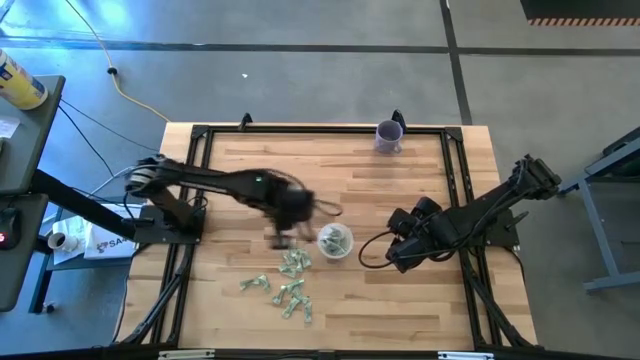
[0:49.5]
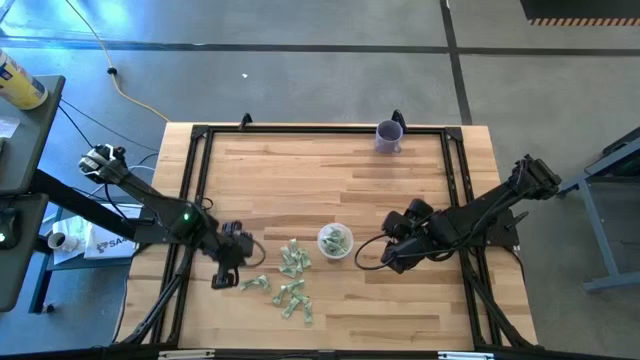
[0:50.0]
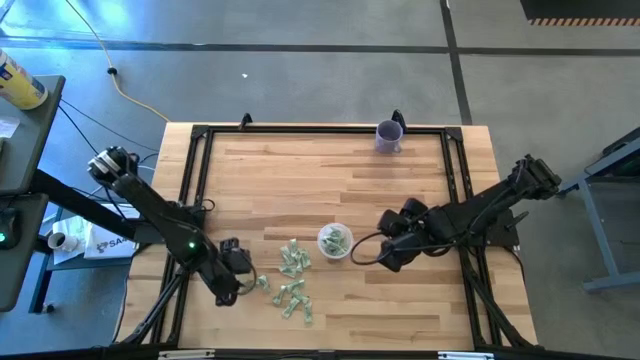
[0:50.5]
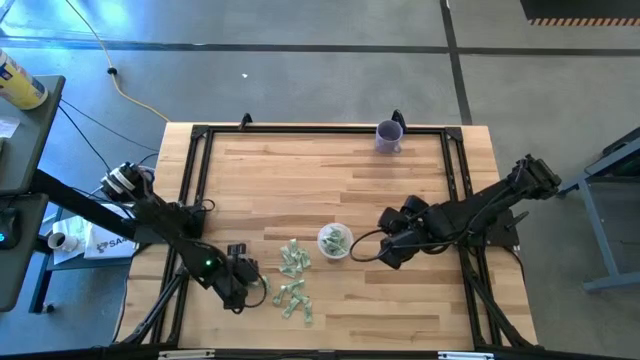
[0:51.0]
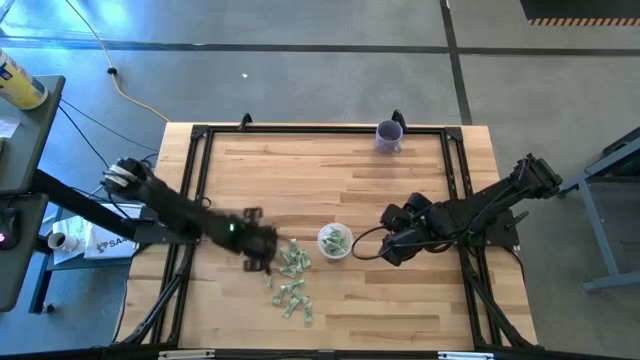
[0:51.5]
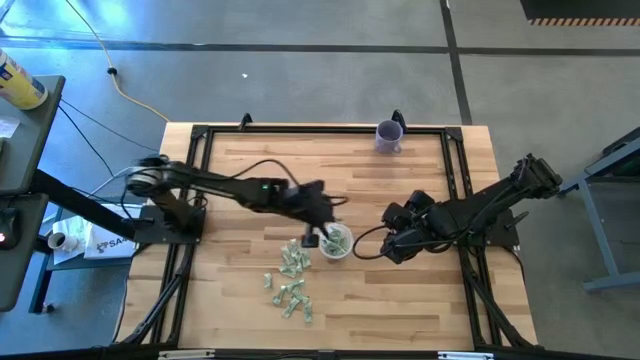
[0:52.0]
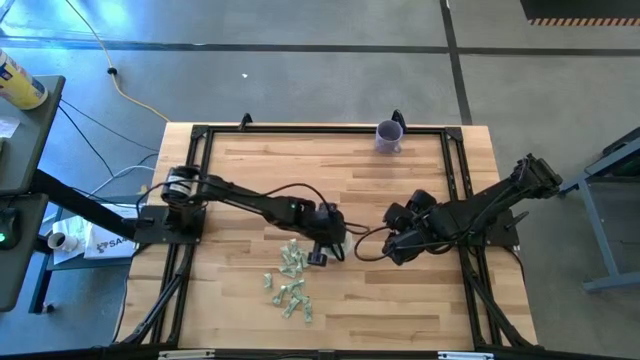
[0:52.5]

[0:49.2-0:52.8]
Task: Pick and place Stevia / Truvia into bins
Put the stevia packet into the bin

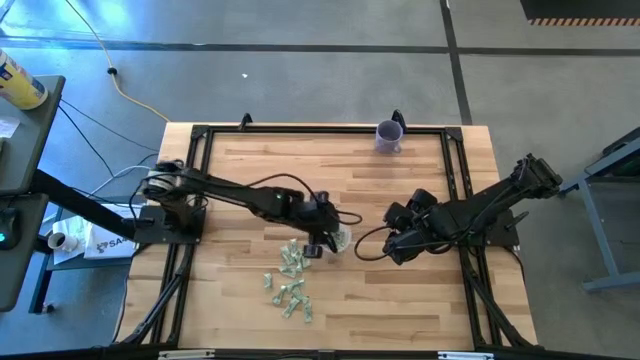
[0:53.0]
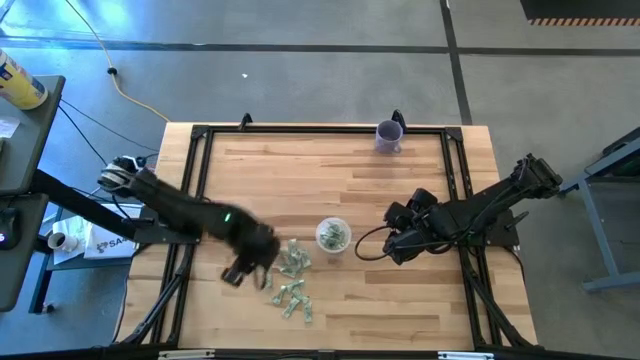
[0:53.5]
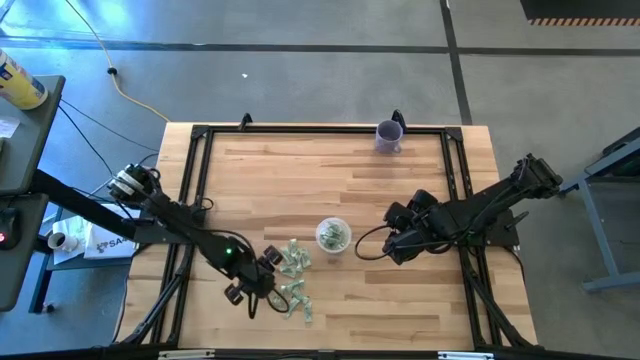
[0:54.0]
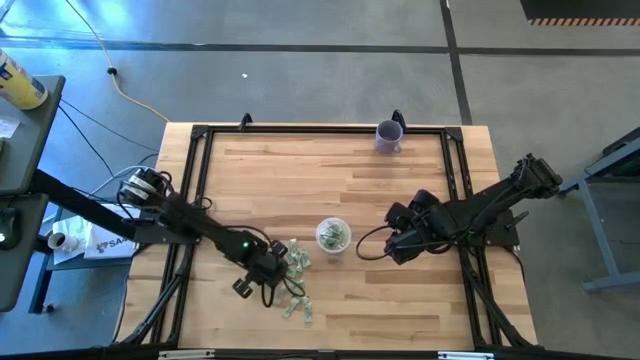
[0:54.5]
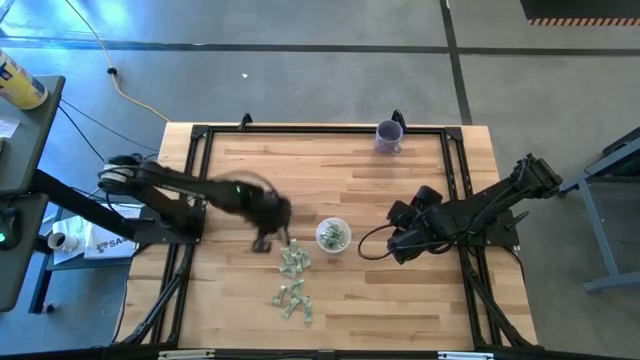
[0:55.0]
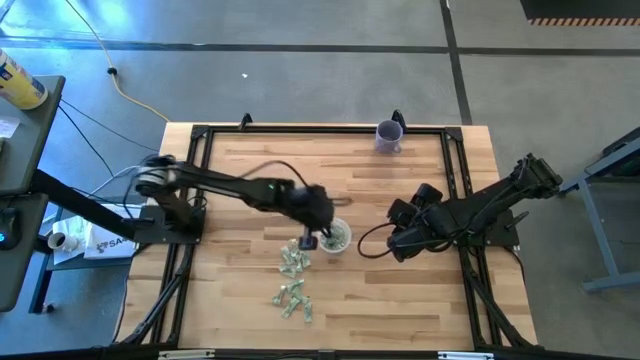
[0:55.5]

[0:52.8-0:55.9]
Put the stevia packet into the bin

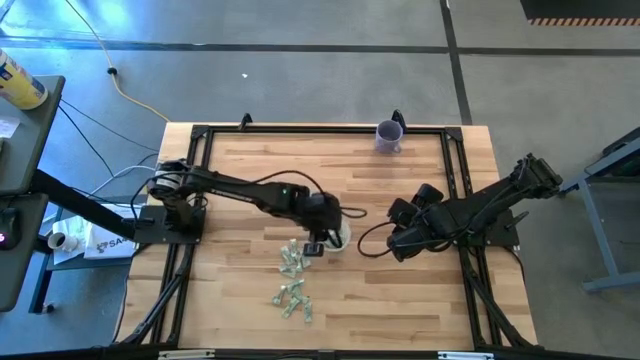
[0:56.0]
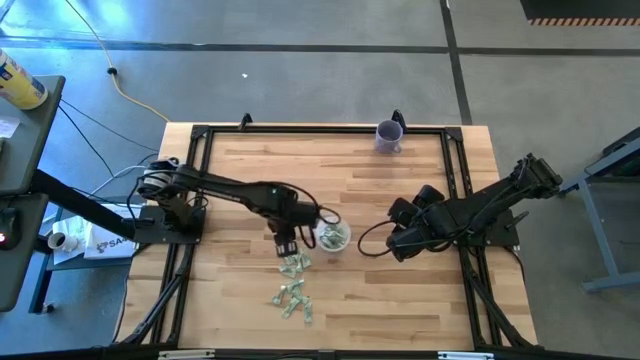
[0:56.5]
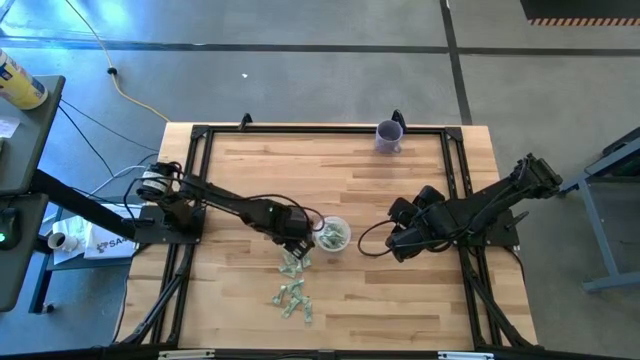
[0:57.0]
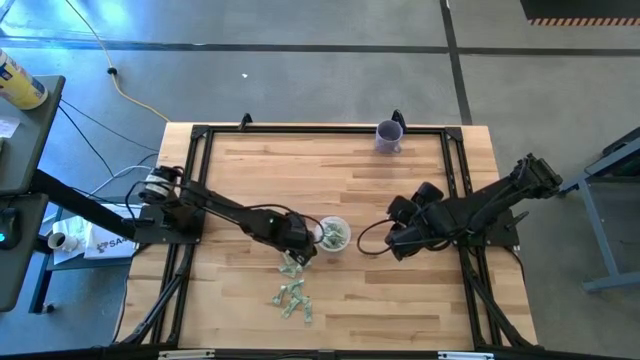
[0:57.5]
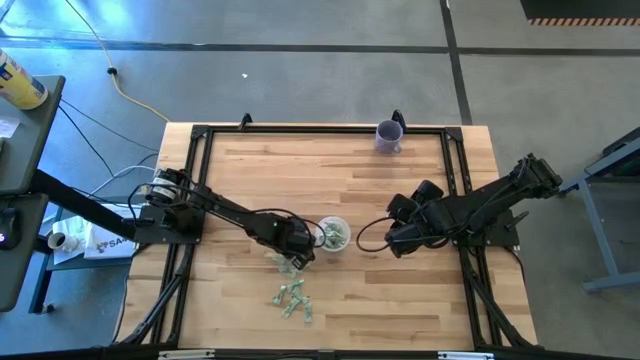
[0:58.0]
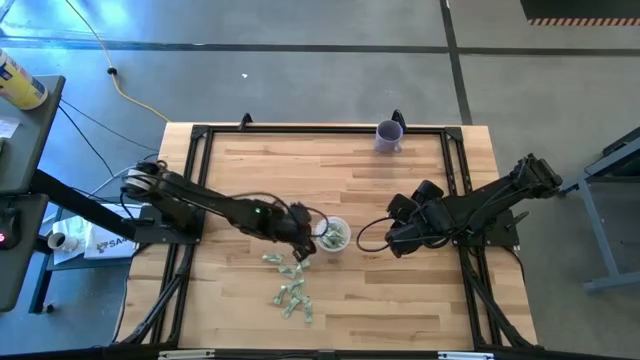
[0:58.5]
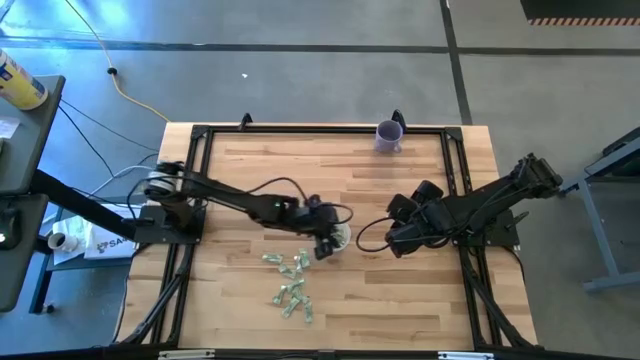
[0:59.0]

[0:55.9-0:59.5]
Put the stevia packet into the bin

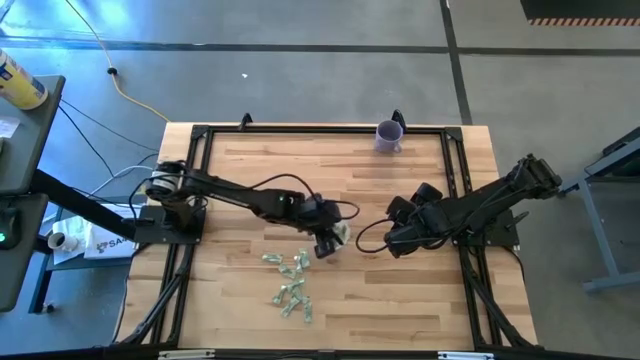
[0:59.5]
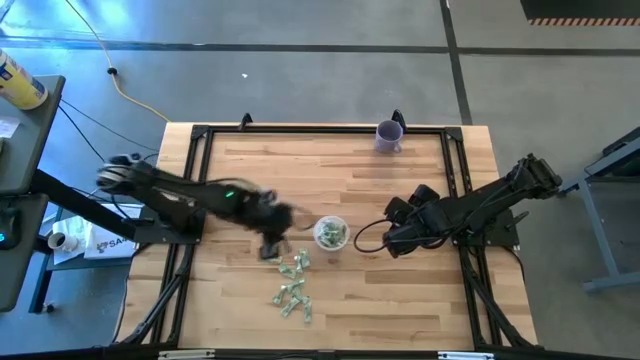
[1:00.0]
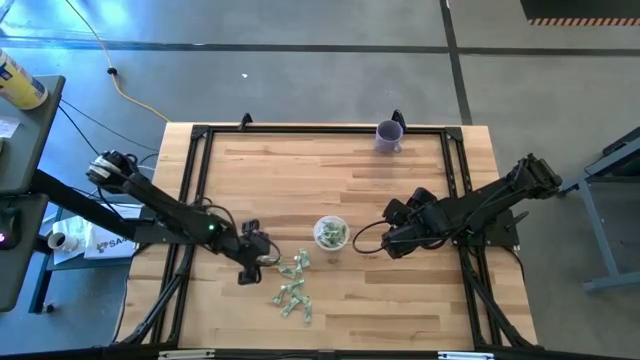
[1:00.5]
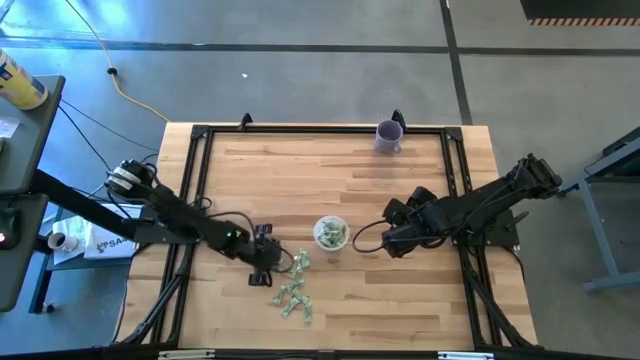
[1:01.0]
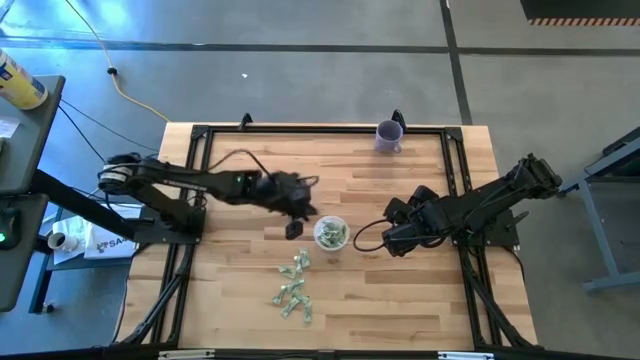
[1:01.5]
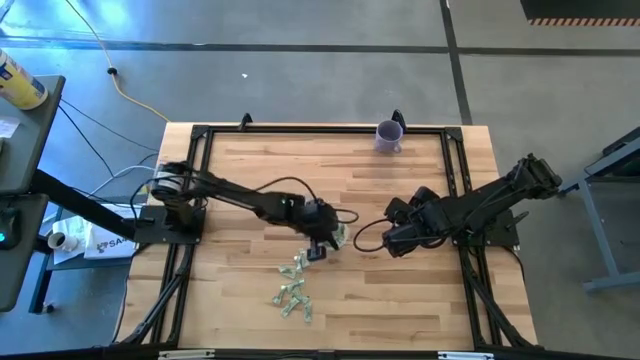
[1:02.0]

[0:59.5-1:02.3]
Put the stevia packet into the bin

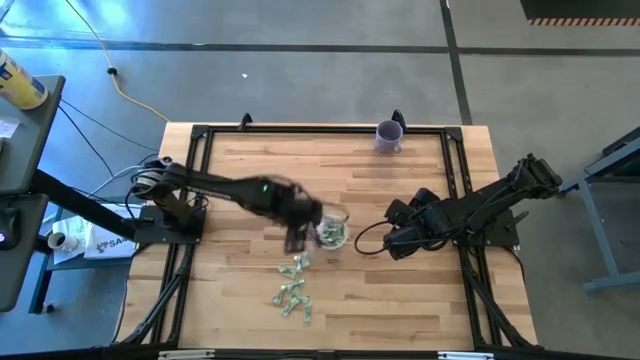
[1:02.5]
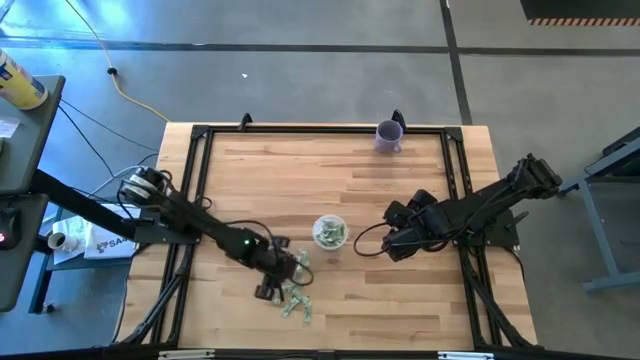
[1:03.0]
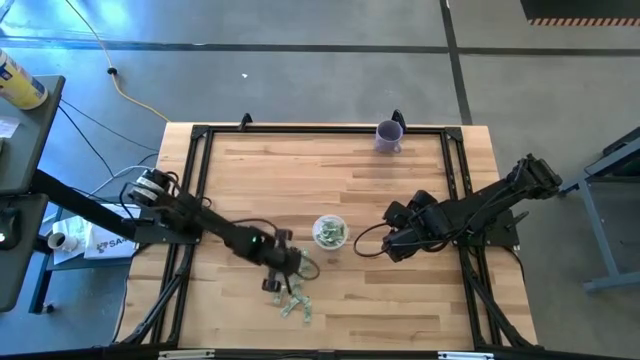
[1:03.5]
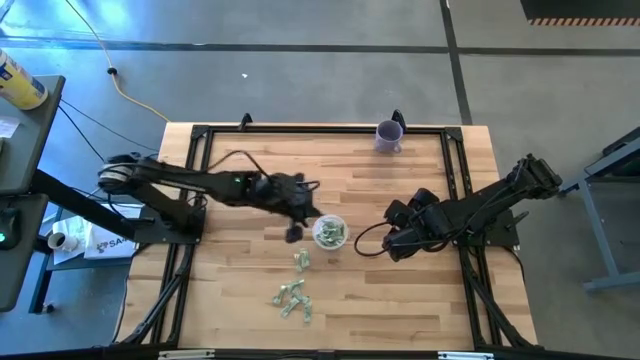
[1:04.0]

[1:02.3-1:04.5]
Put the stevia packet into the bin

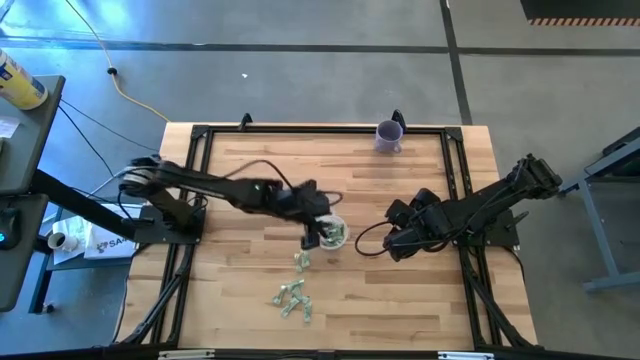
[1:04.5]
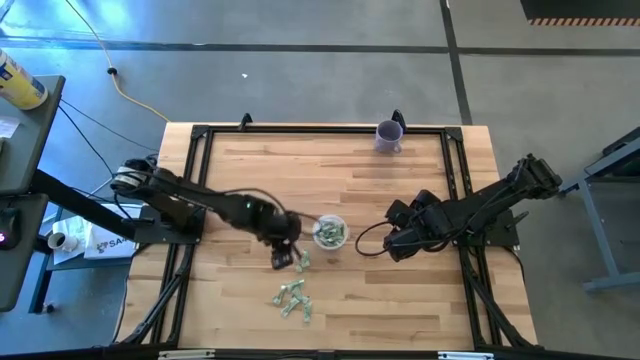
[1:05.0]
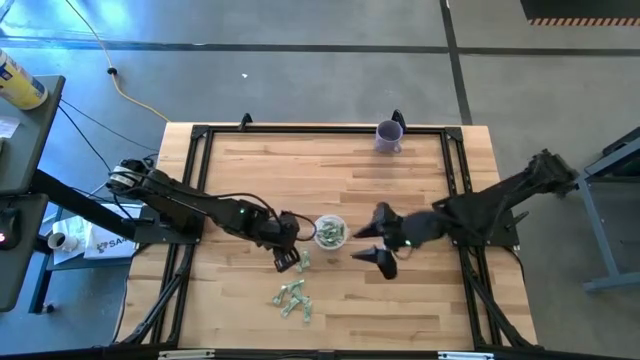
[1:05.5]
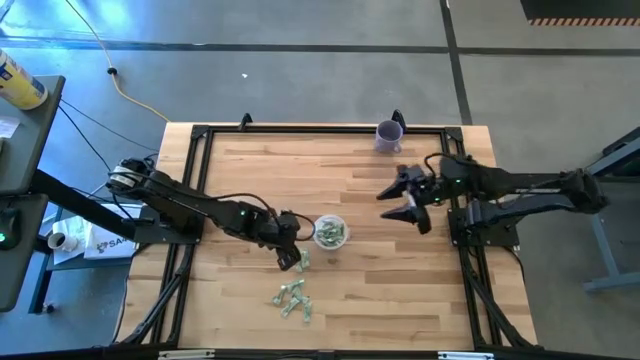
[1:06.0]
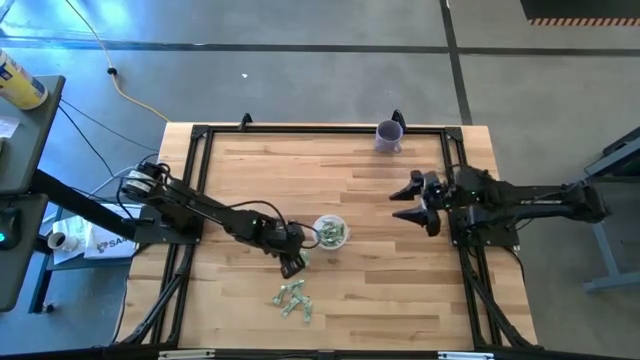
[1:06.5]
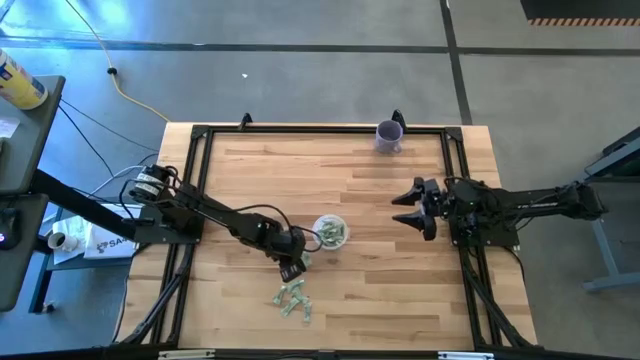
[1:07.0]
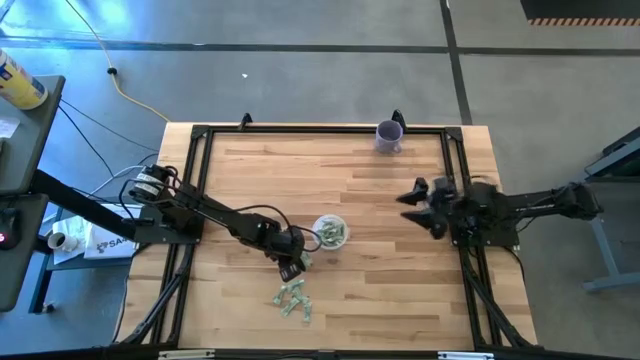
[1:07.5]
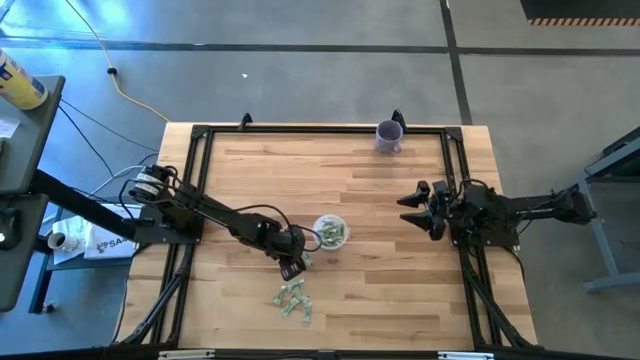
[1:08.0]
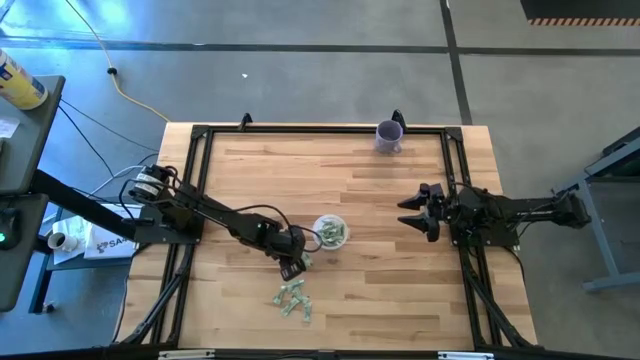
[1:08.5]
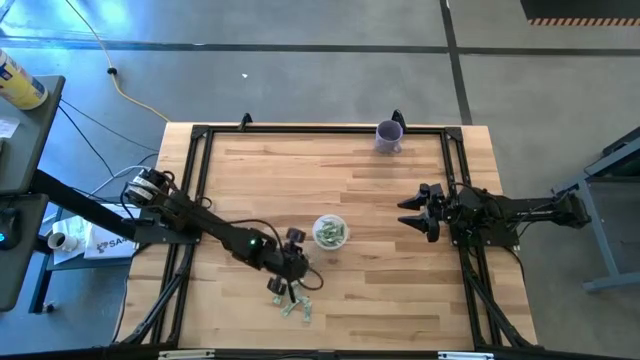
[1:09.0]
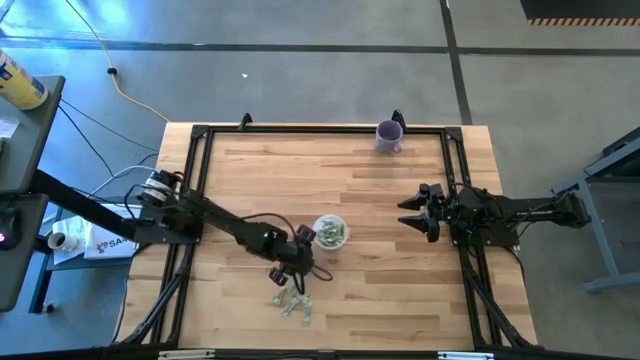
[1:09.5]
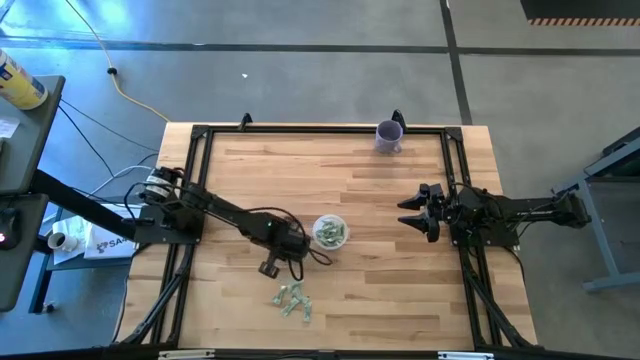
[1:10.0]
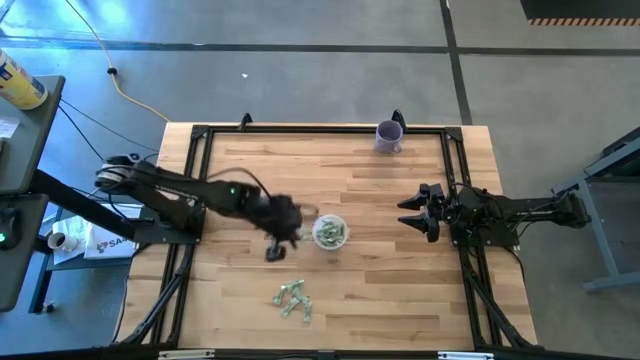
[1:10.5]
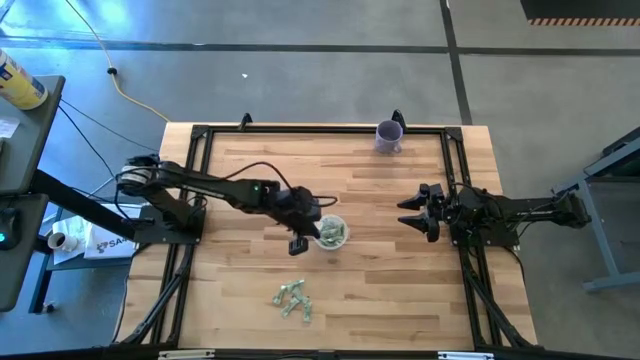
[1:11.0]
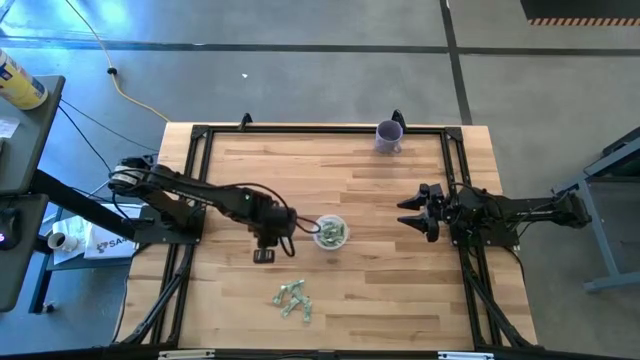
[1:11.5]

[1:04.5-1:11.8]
Put the stevia packet into the bin
